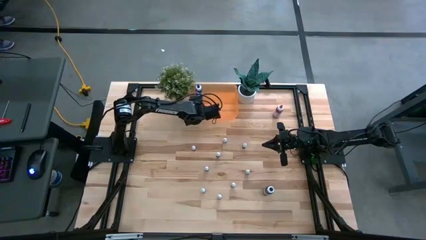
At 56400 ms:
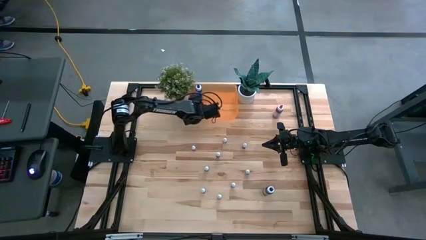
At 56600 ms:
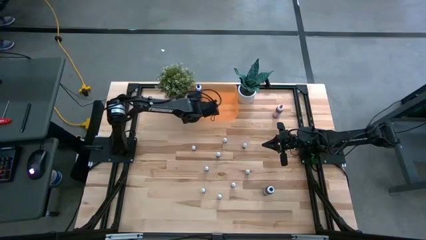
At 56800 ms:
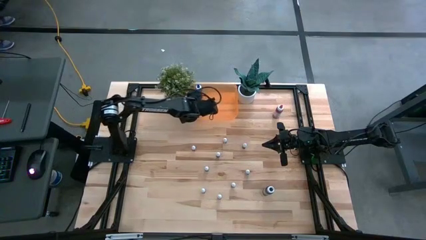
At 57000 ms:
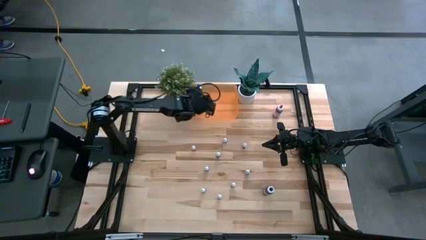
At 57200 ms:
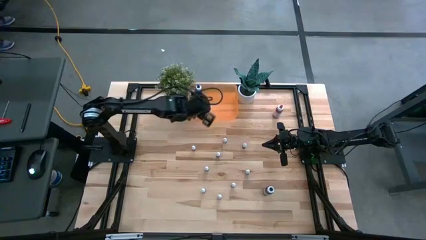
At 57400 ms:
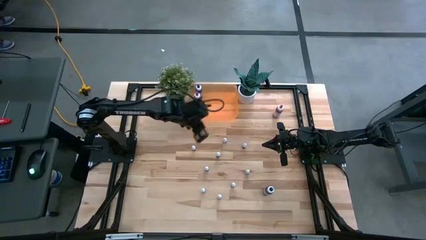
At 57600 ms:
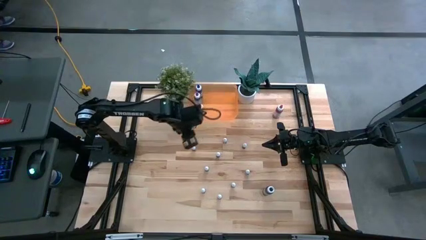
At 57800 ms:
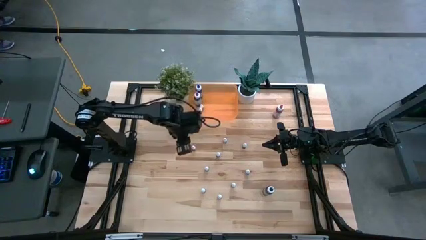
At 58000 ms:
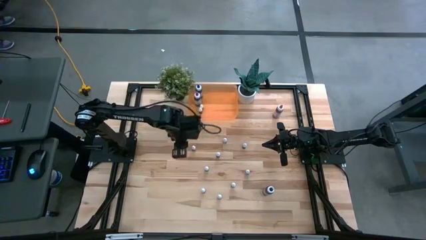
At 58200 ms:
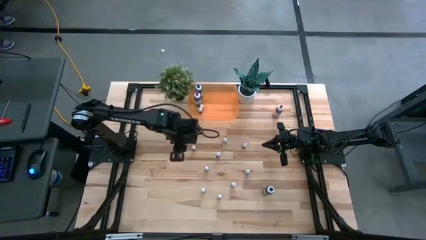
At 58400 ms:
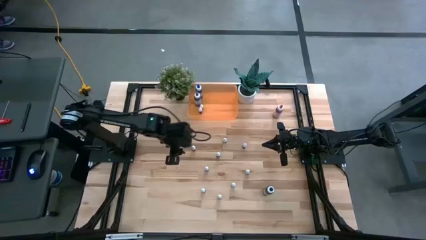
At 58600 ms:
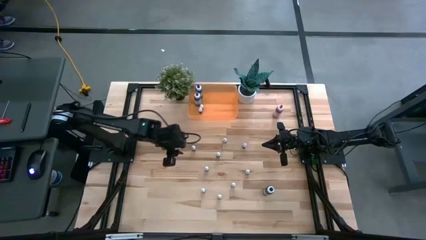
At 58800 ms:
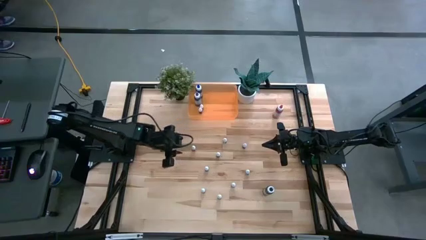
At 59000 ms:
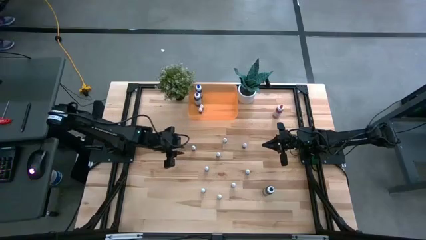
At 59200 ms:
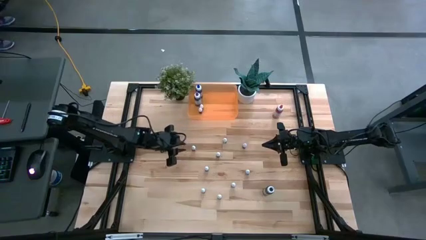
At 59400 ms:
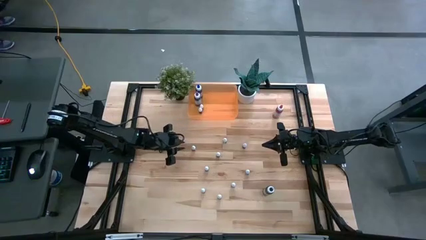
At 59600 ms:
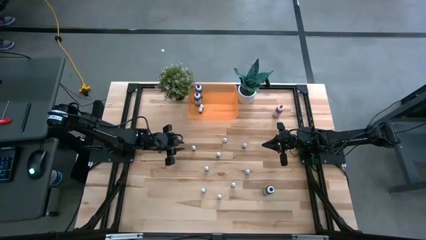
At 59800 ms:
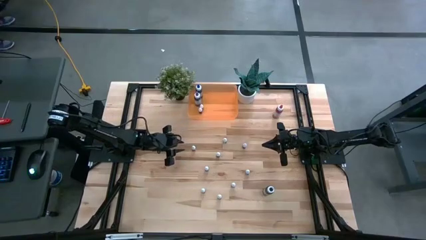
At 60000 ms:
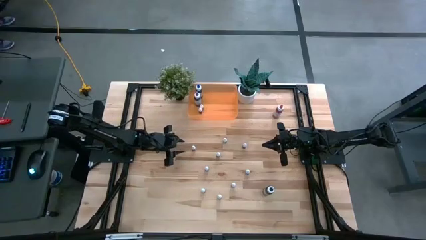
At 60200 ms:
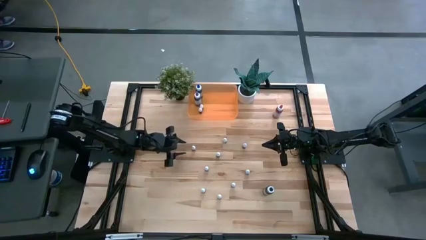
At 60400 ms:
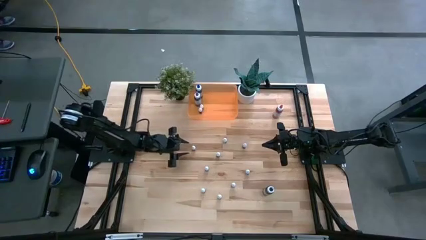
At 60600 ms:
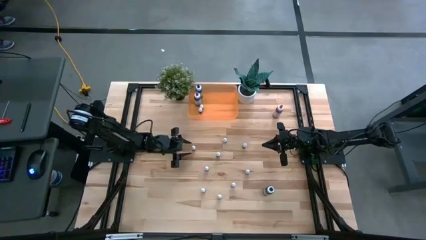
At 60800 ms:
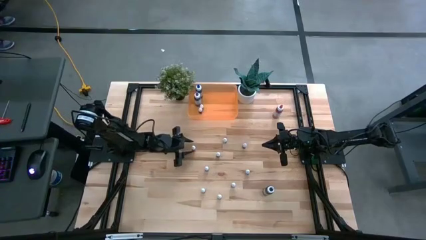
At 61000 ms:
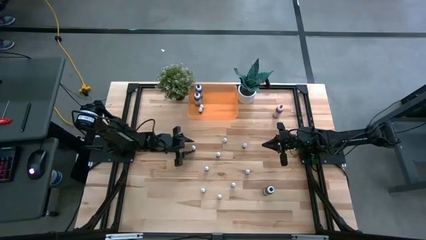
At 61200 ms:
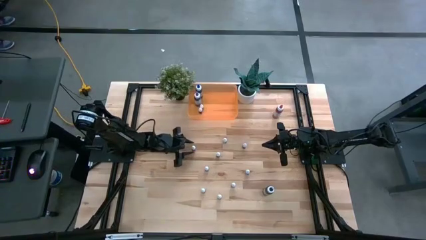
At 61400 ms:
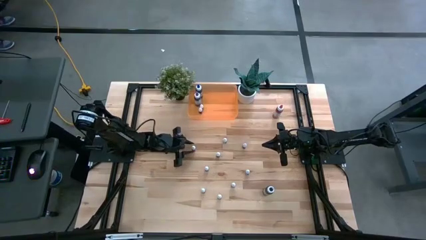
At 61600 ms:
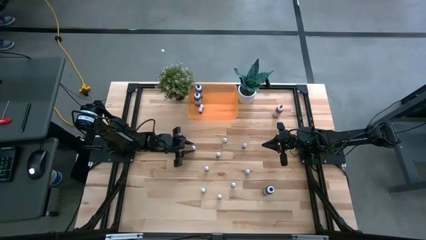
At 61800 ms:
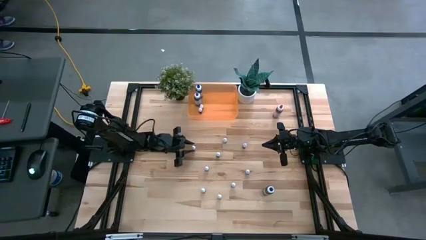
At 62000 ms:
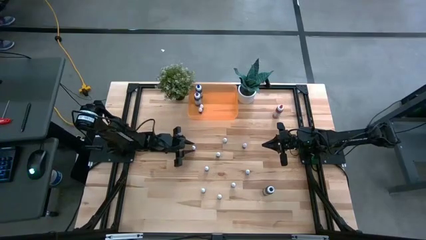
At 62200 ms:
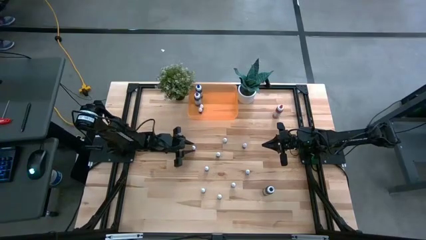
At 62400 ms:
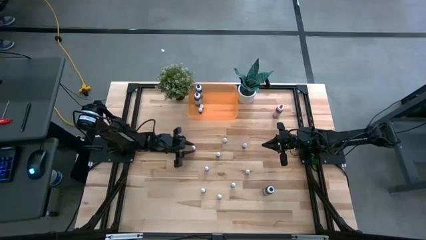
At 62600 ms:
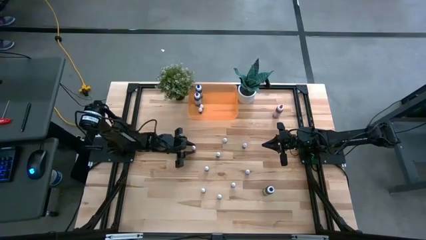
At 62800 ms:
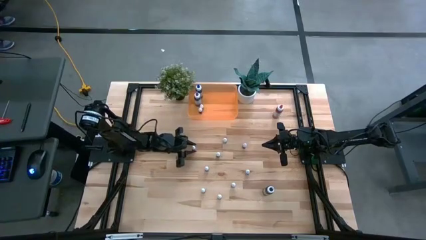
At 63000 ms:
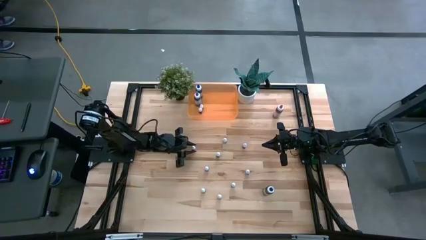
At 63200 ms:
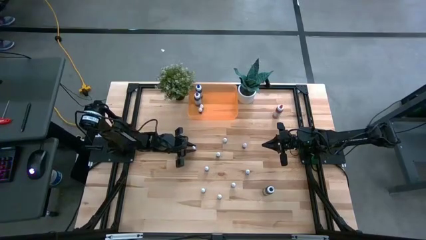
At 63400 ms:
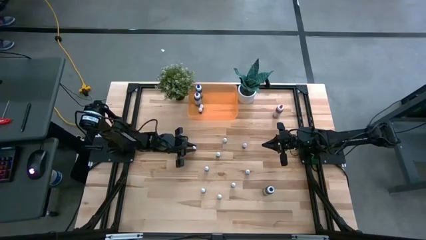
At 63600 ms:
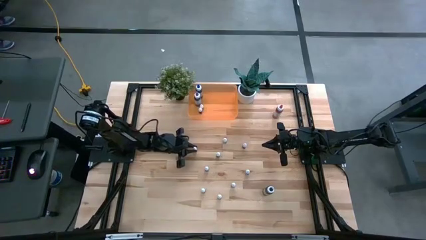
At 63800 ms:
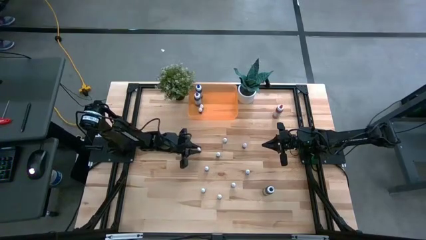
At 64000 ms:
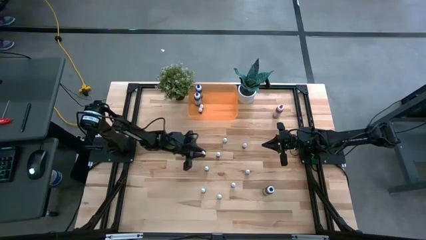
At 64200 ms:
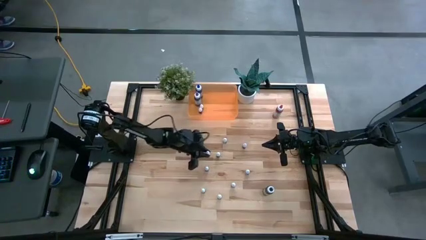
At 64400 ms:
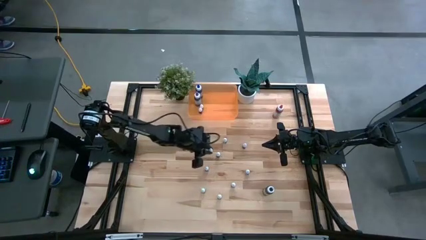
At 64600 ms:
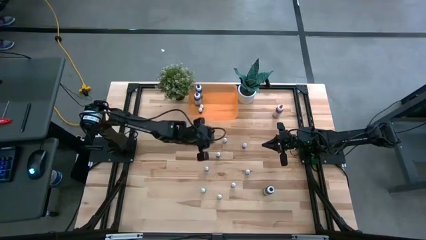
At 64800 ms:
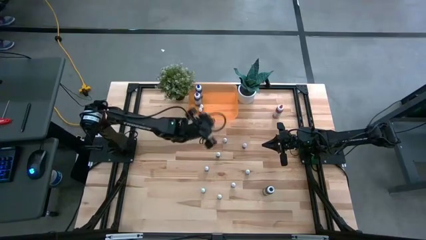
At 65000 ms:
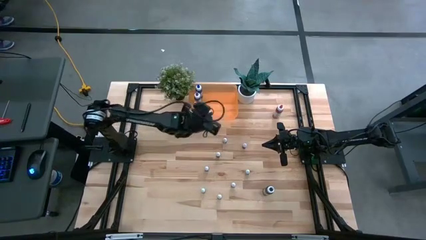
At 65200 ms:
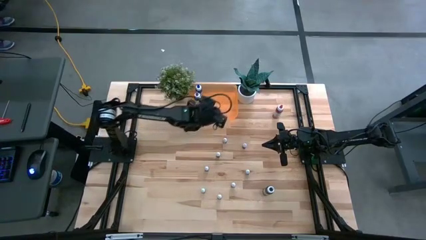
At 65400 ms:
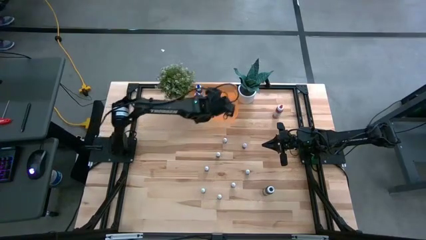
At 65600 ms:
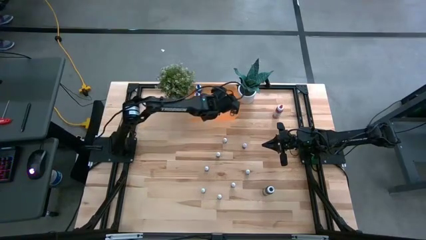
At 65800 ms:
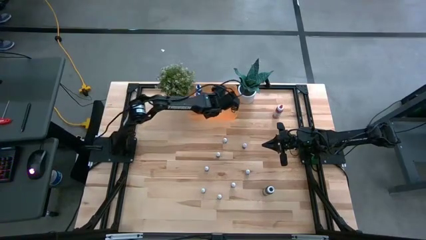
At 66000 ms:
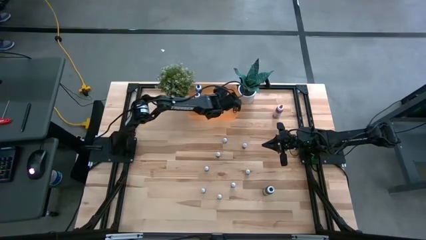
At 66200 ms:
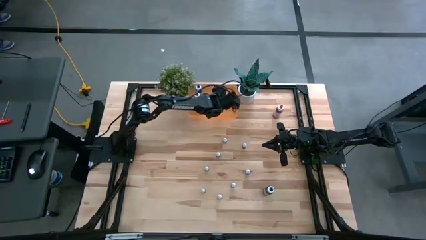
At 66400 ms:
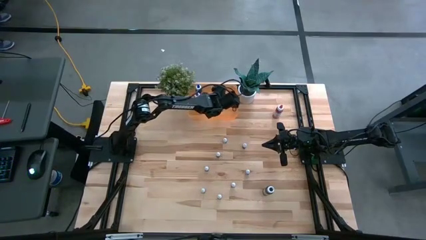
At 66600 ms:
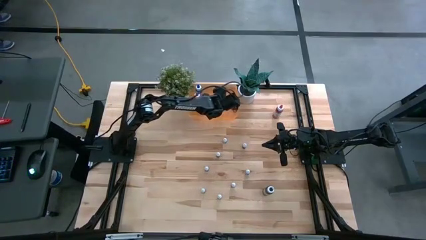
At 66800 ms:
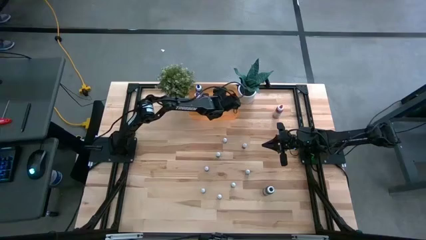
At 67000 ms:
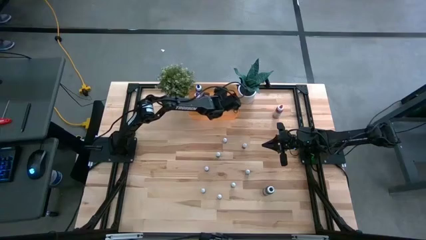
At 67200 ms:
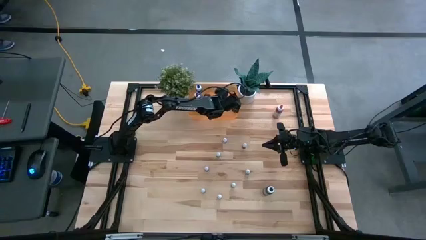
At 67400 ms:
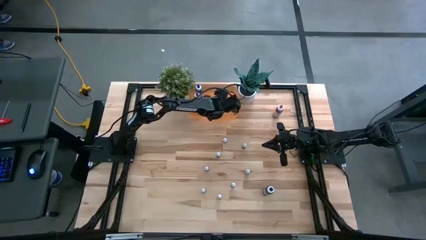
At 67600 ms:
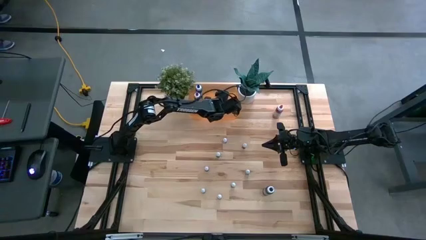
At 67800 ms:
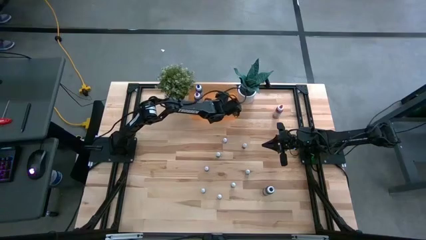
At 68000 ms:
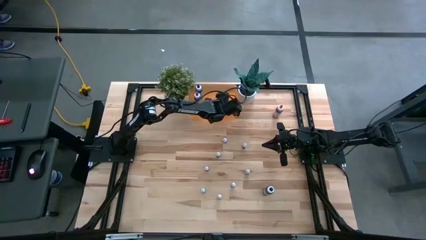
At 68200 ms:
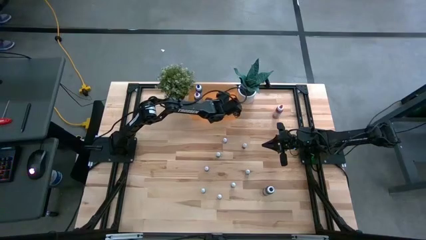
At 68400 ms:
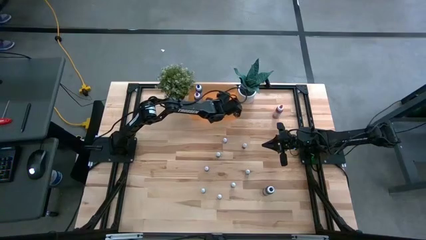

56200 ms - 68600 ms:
Task: Pick & Place food coloring
Put the top small red bottle into the bin
